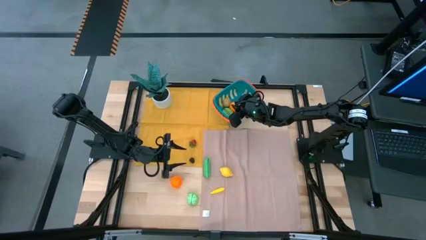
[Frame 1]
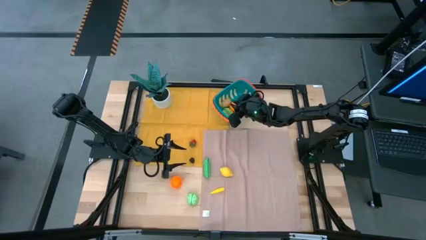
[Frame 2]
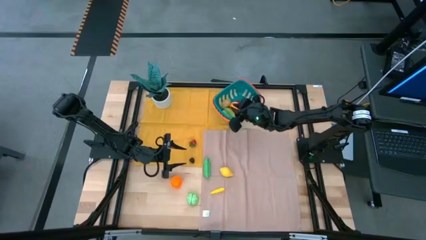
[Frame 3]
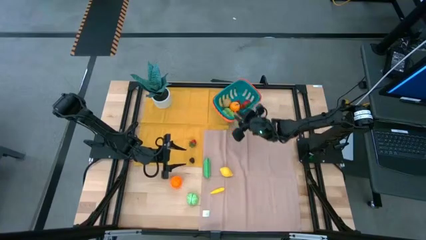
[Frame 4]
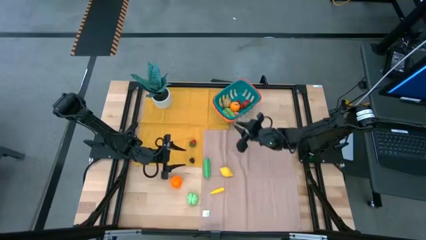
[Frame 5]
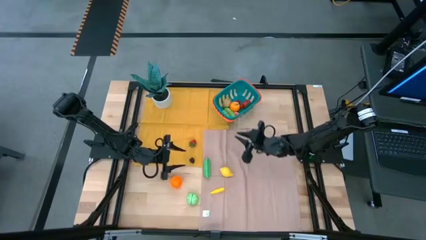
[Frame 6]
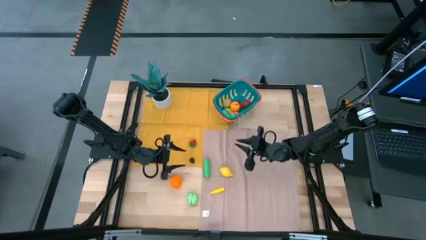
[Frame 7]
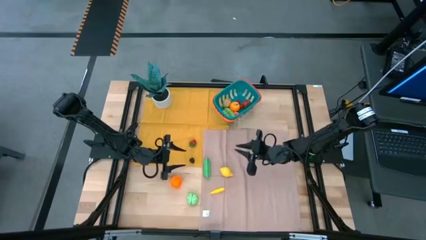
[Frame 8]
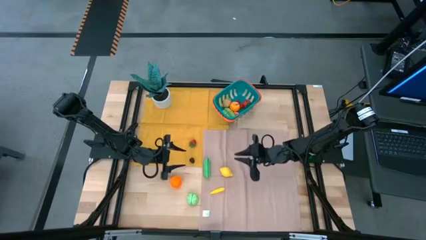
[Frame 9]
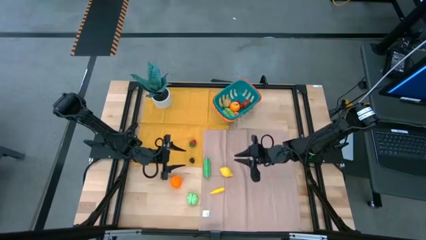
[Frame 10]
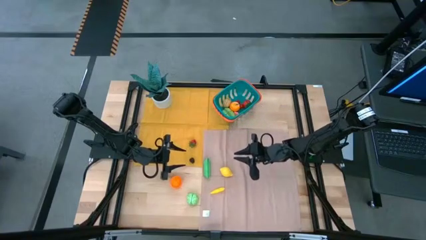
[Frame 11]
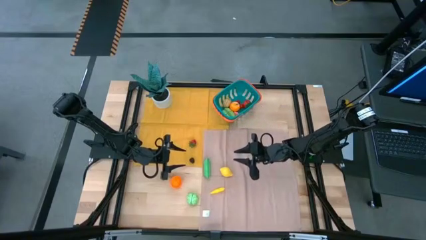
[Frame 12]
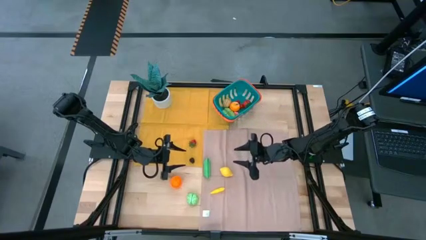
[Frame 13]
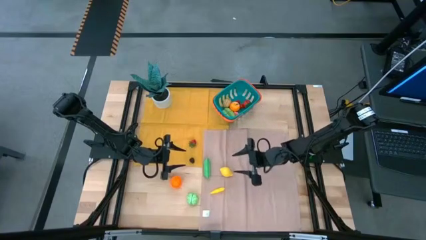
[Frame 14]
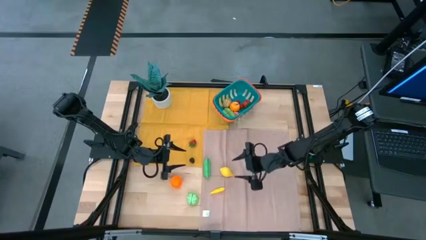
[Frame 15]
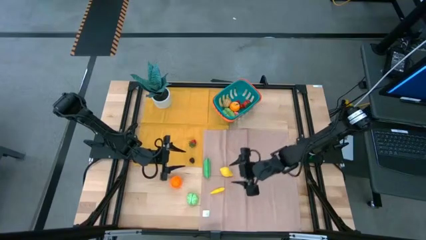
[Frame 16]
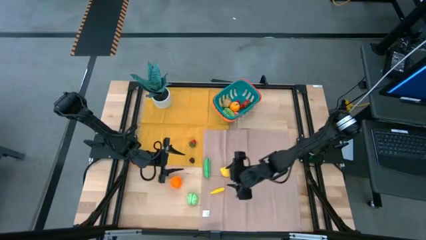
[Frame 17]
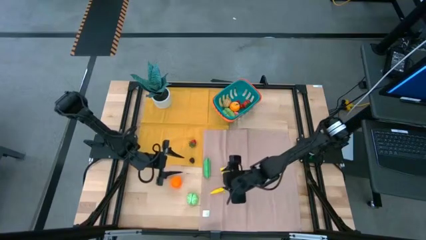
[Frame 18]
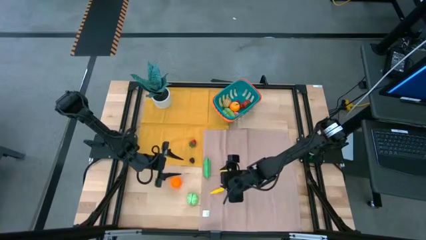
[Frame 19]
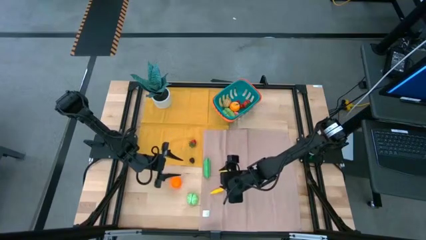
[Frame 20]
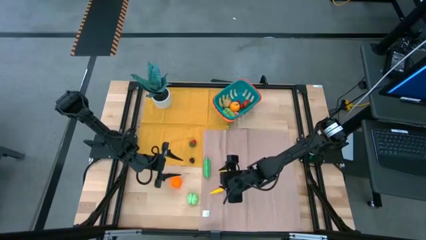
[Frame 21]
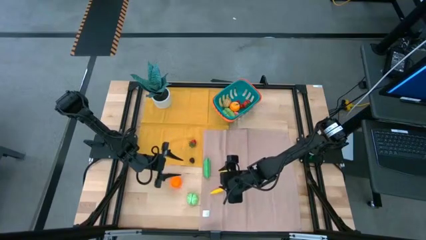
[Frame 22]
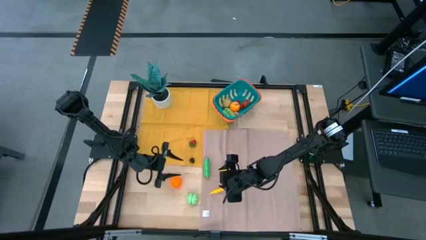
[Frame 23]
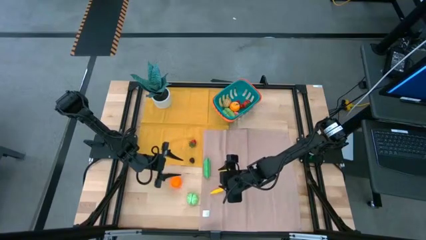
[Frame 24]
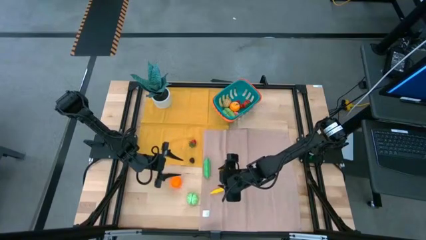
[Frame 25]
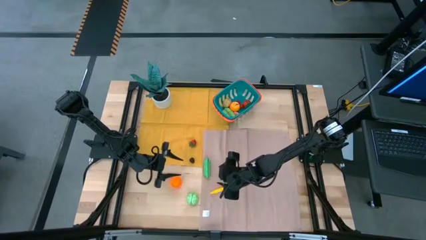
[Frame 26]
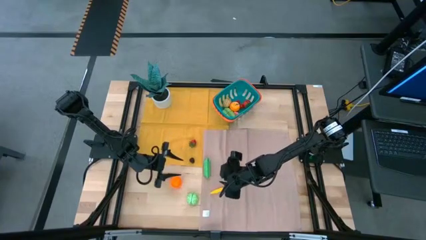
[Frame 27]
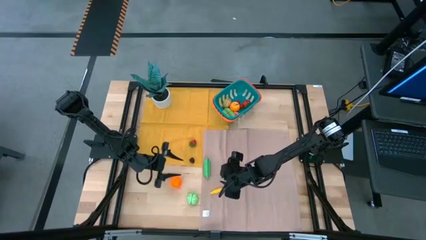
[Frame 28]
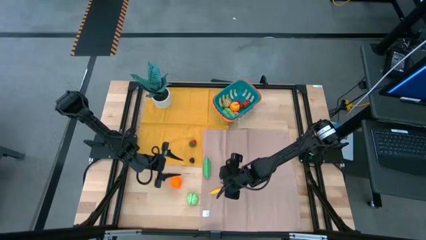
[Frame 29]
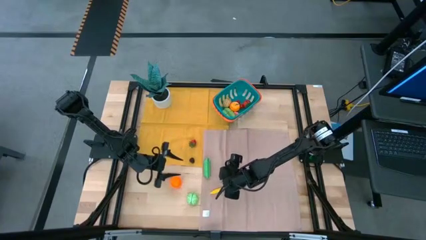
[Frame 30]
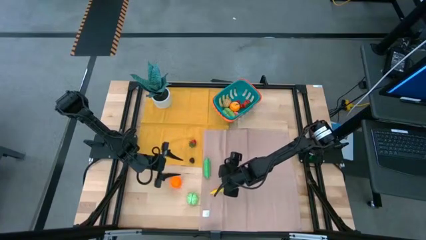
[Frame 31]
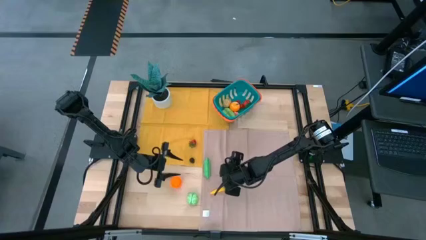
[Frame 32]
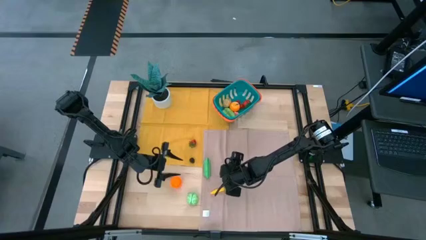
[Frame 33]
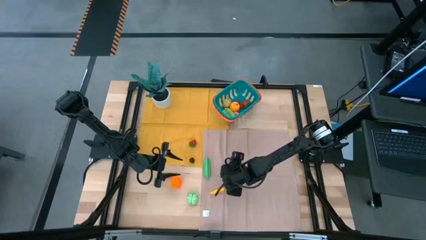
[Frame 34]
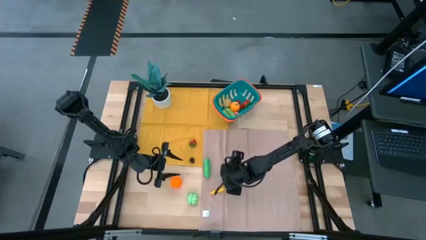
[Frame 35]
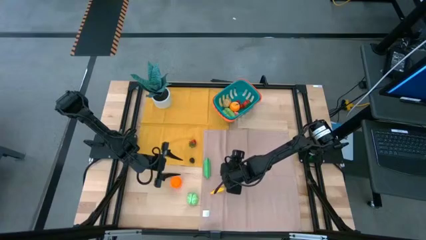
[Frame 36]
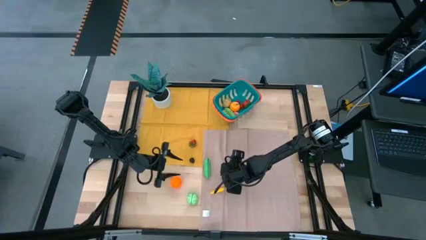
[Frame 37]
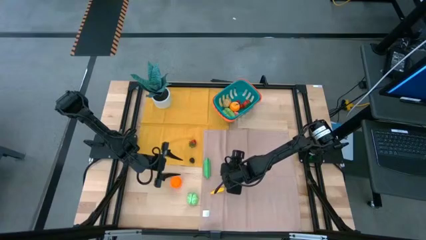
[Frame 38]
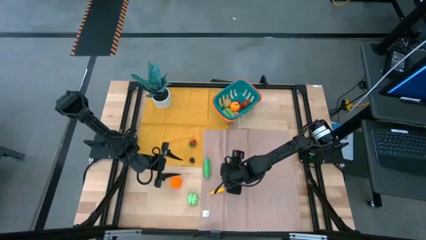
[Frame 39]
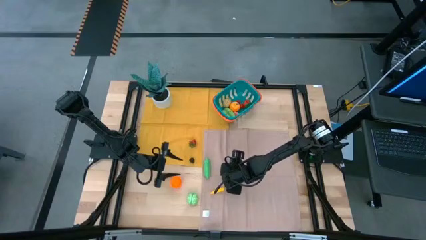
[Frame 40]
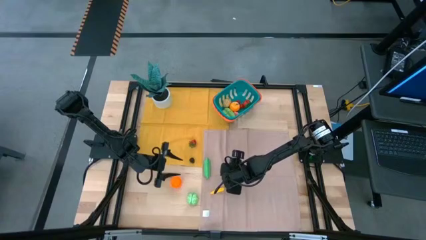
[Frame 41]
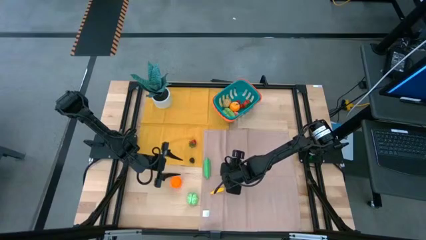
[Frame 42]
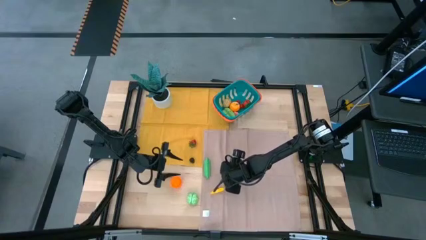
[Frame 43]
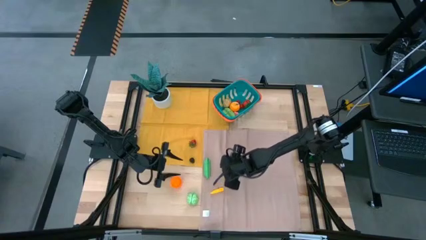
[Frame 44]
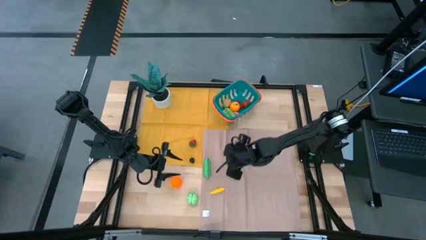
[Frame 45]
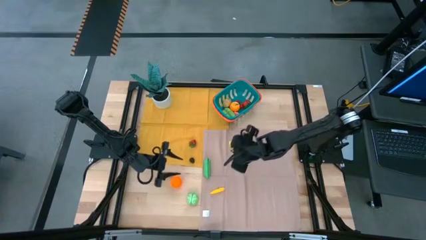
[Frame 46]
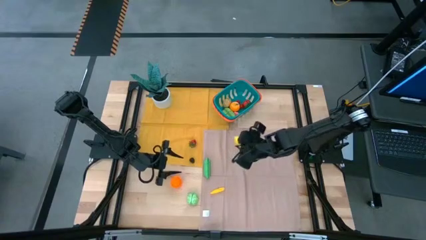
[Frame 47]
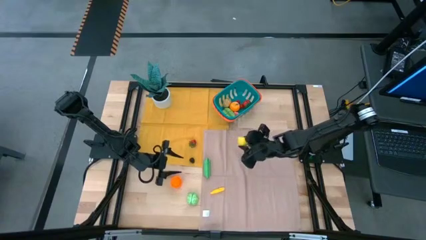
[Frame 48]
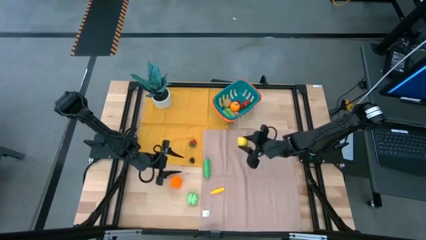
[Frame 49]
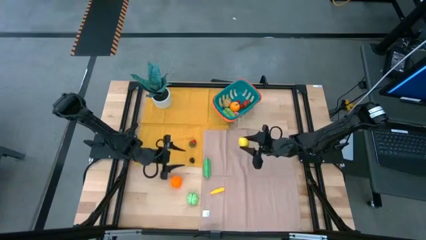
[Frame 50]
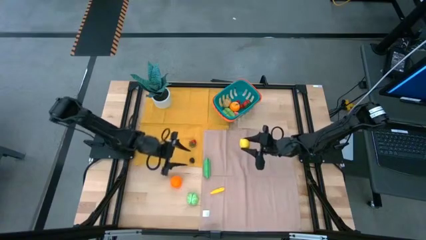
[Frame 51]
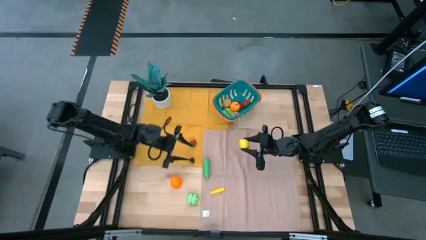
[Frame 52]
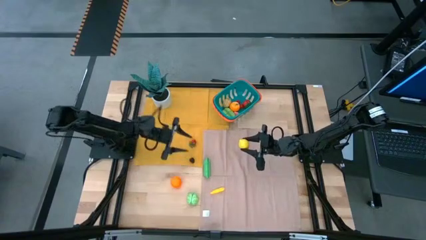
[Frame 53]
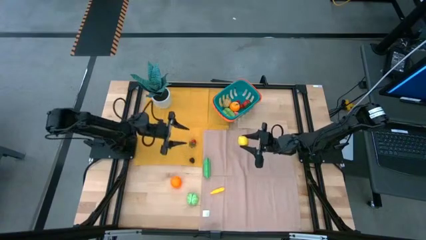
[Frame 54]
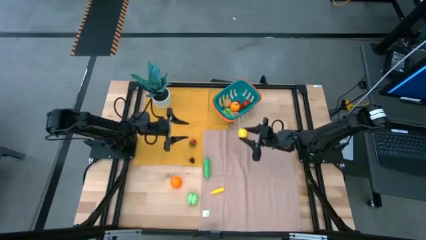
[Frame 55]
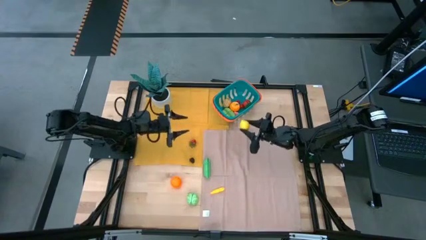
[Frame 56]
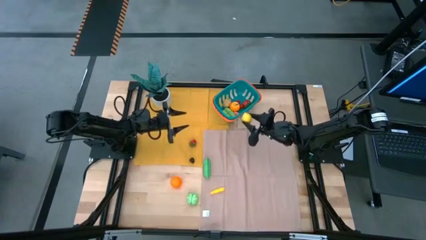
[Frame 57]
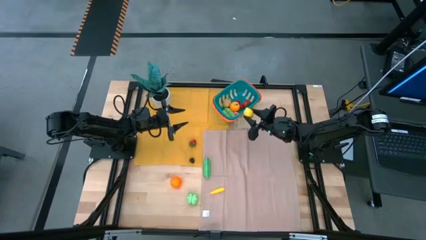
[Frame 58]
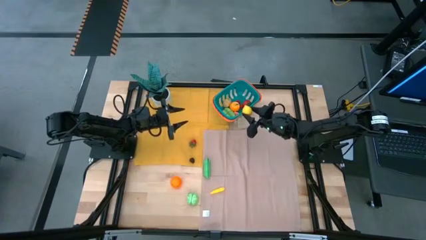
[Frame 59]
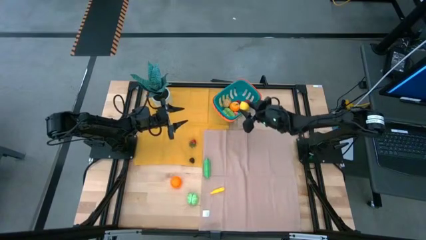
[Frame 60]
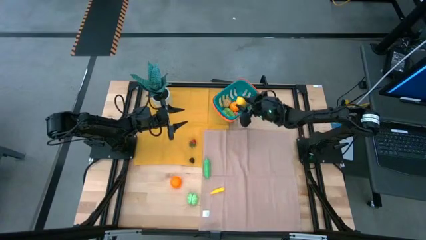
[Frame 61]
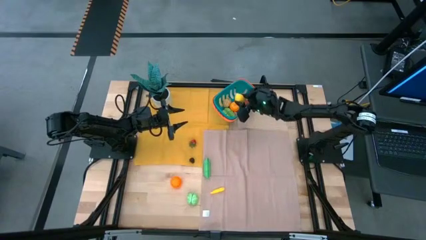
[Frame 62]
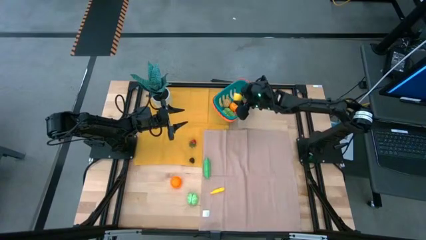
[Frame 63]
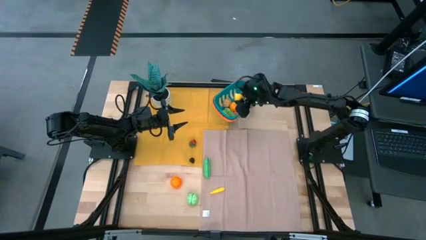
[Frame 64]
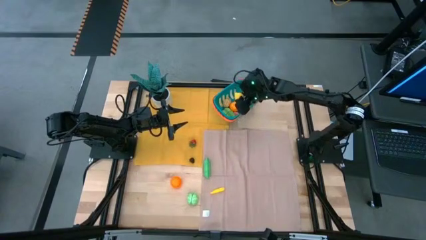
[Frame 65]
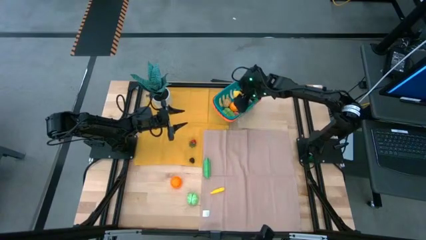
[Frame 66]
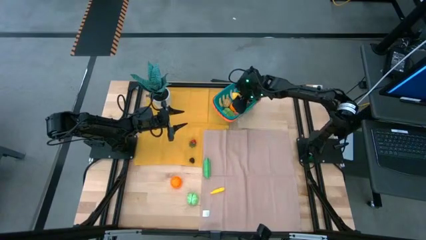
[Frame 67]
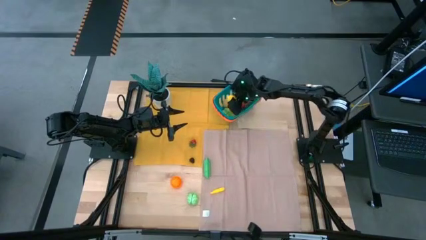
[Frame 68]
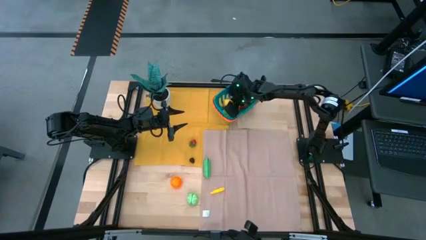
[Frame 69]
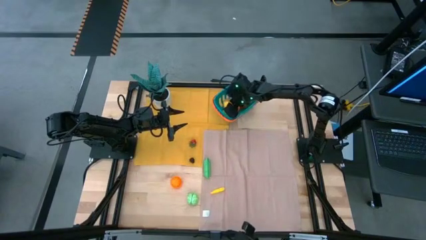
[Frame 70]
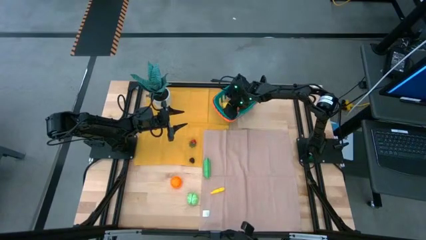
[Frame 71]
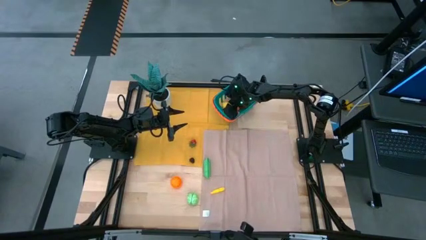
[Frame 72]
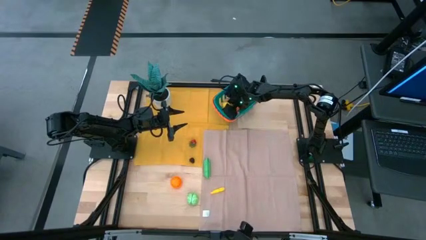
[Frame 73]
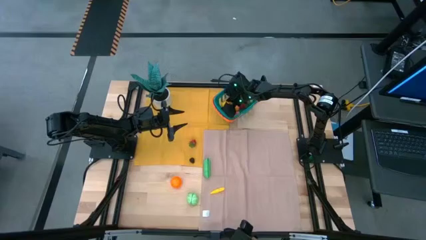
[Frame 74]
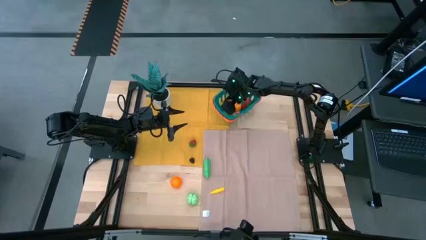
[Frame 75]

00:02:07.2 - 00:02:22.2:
Task: Pick and placing Produce into tupperware
Put the lemon into the basket

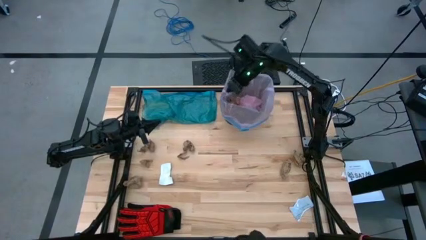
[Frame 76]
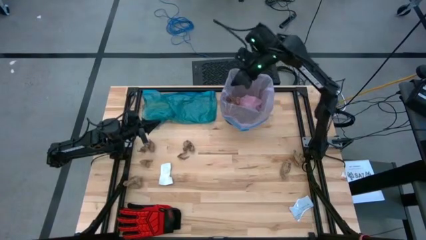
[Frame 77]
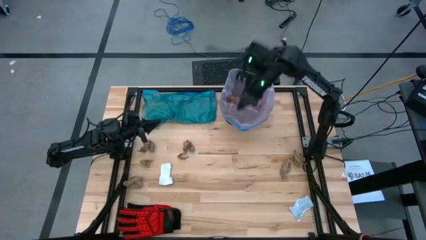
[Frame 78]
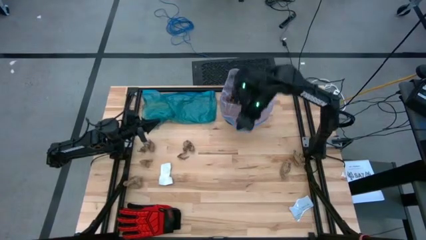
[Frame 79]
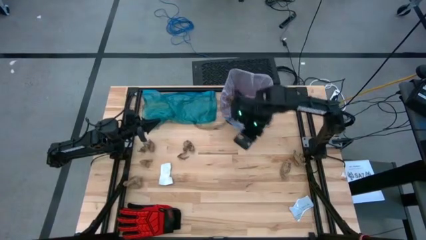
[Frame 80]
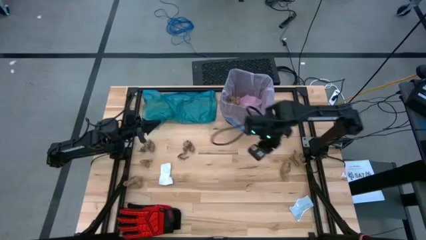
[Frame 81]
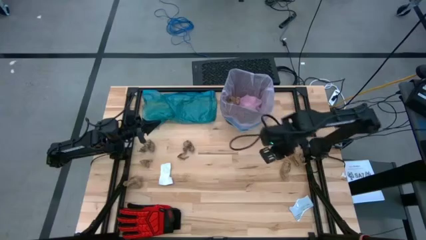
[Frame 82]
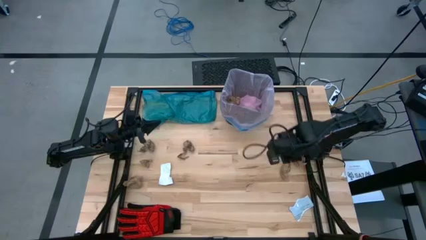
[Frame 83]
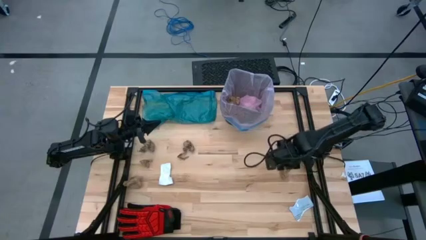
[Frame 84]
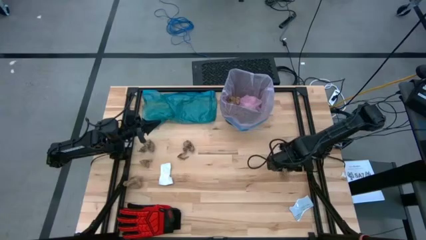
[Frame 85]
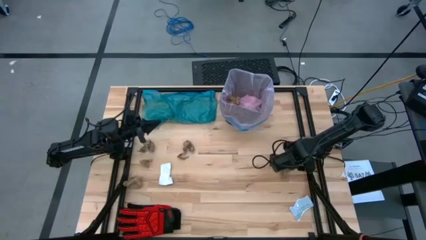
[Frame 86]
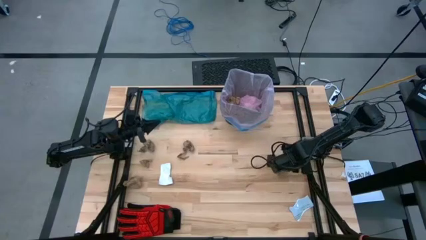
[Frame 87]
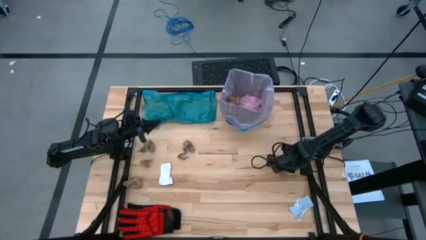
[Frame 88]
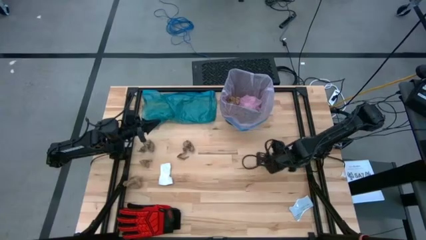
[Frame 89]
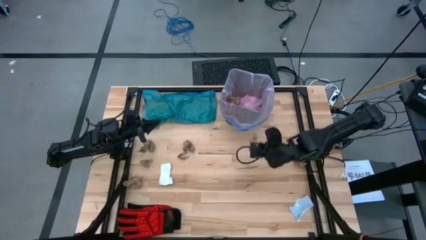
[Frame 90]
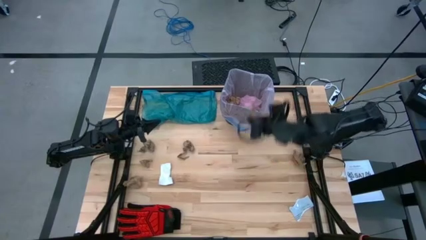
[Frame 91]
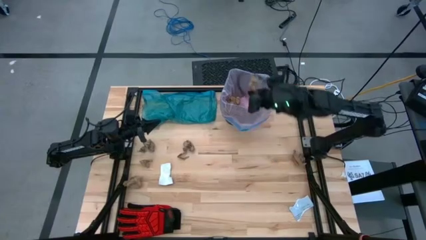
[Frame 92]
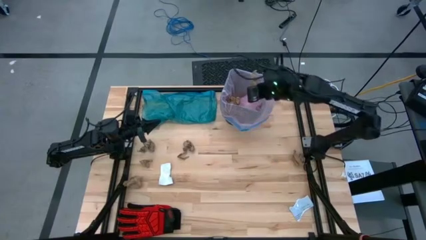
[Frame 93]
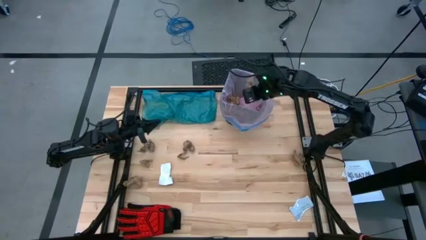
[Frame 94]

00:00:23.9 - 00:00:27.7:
Task: place trash/remove bag and relplace
Put the brown paper into the black trash bin
